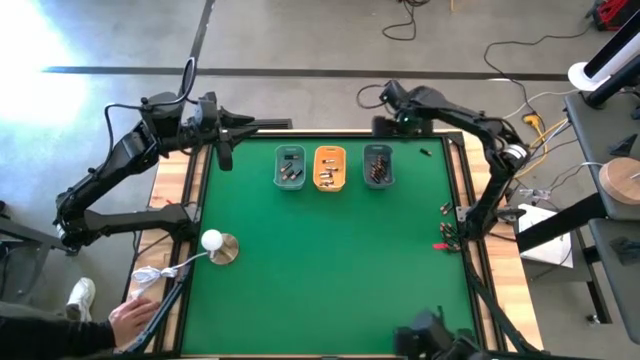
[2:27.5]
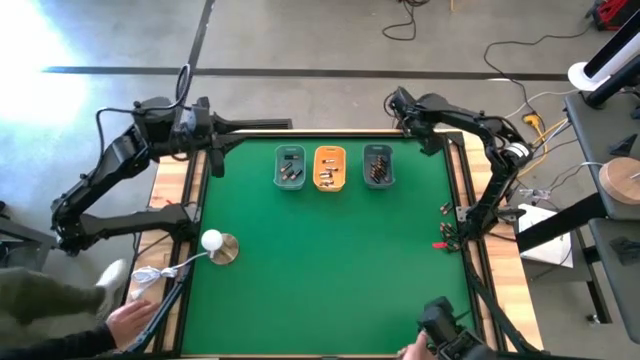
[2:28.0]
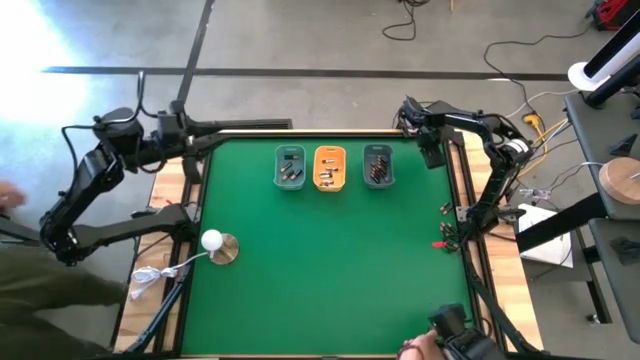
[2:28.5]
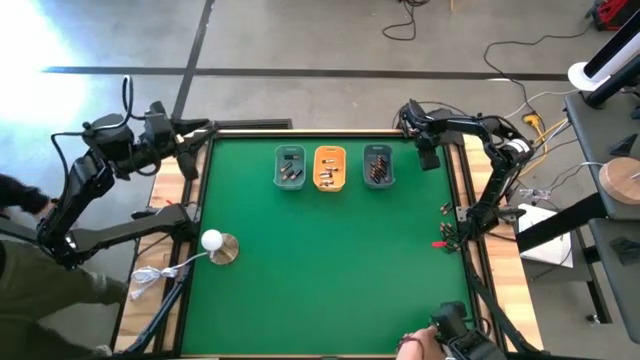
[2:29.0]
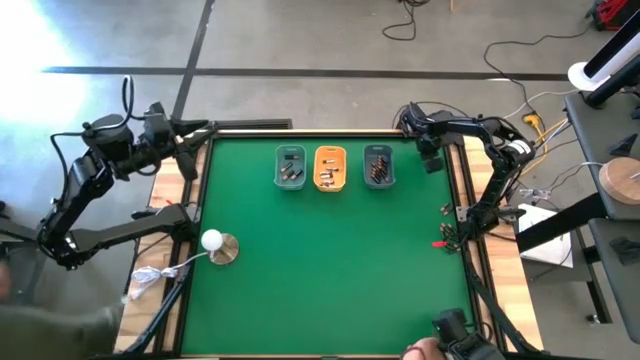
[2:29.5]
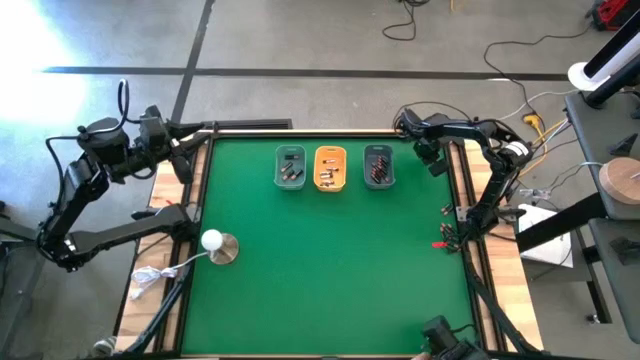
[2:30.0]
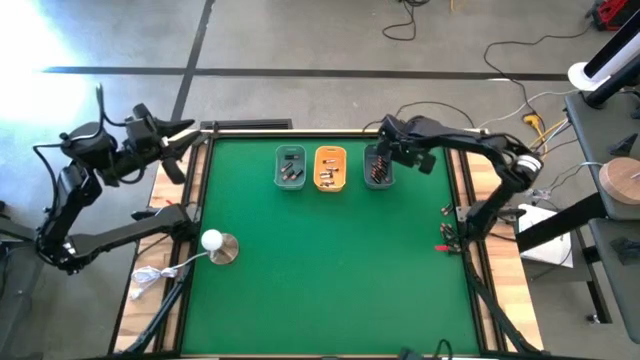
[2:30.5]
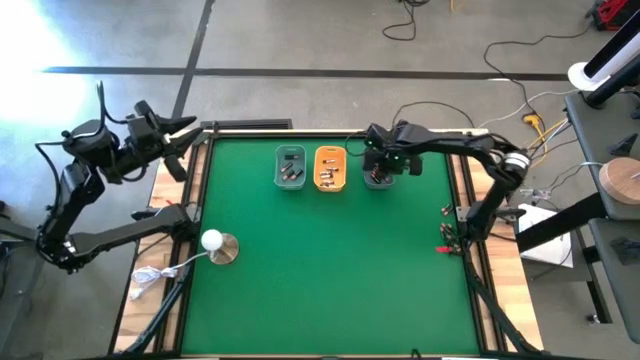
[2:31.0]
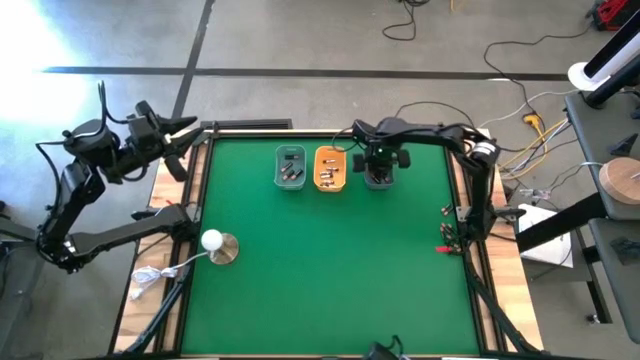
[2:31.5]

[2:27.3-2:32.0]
Task: Sort batteries
Put the small brown battery into the gray bin

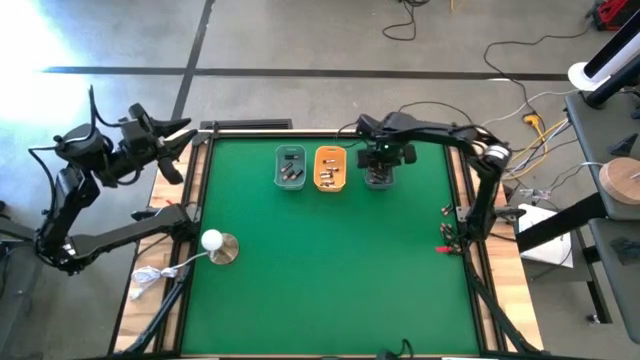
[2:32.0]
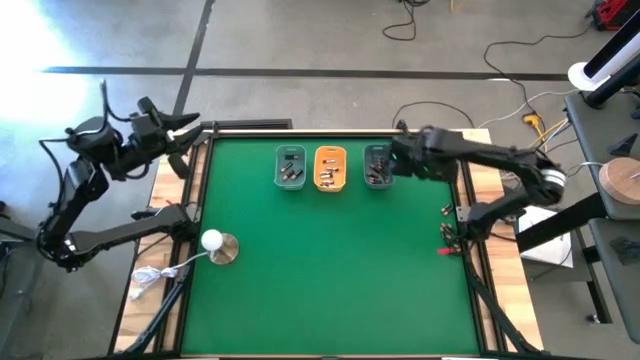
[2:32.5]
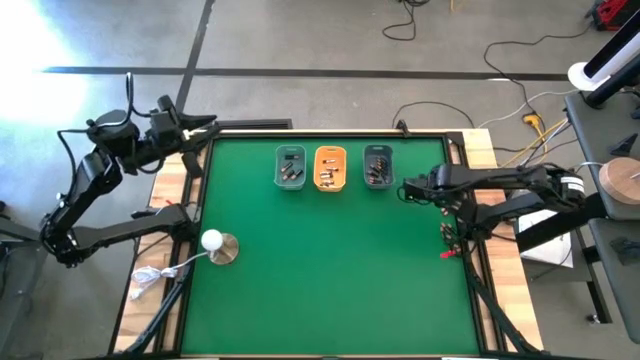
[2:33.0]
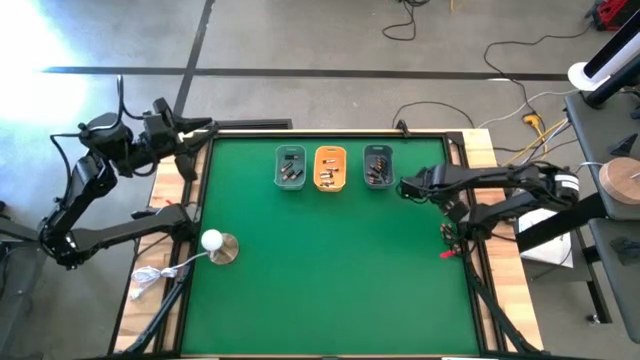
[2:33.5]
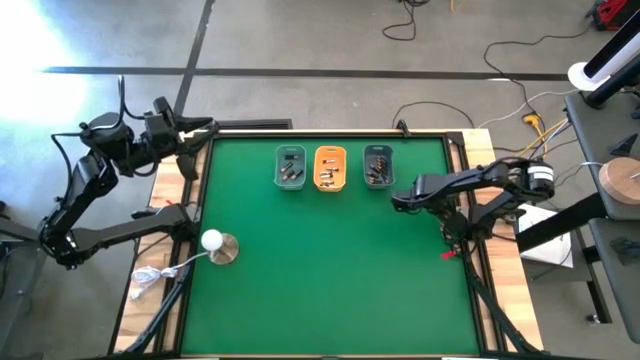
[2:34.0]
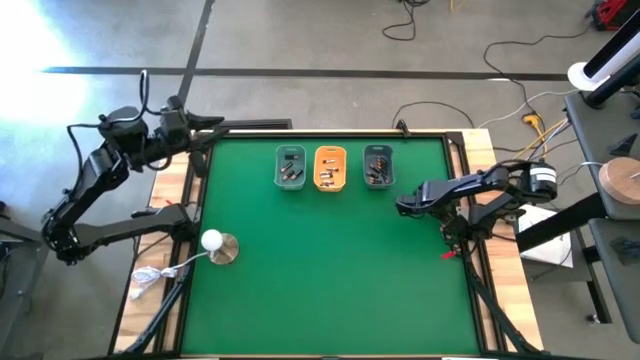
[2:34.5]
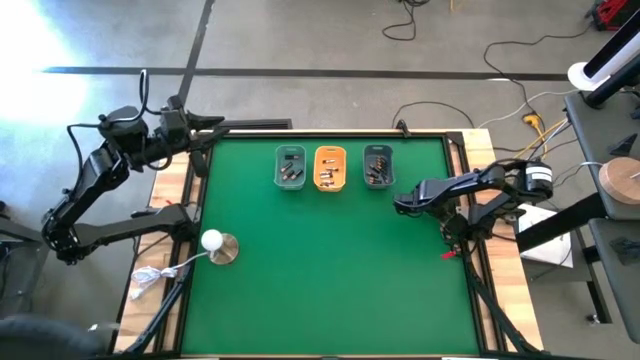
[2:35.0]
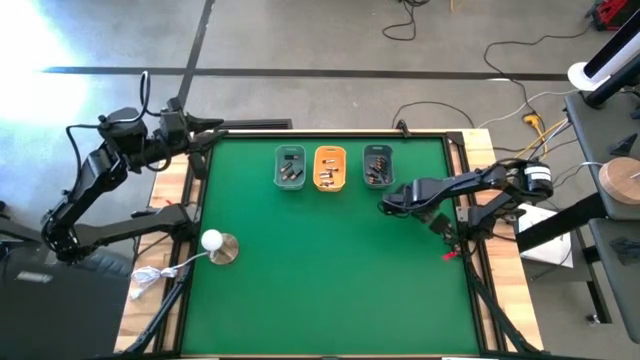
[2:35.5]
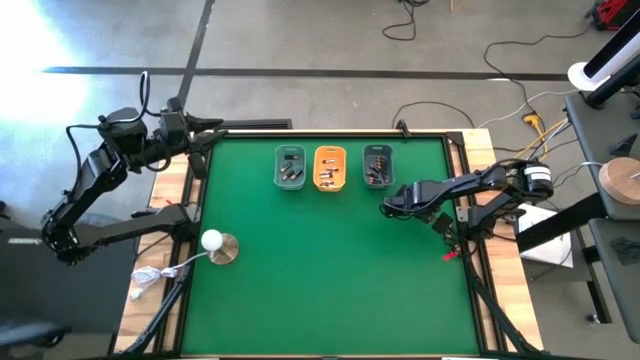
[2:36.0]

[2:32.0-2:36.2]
Put the small brown battery into the gray bin

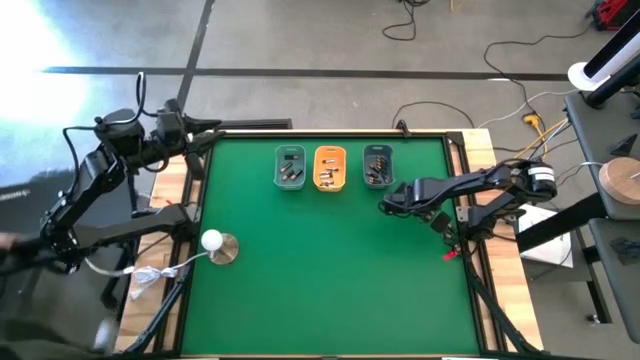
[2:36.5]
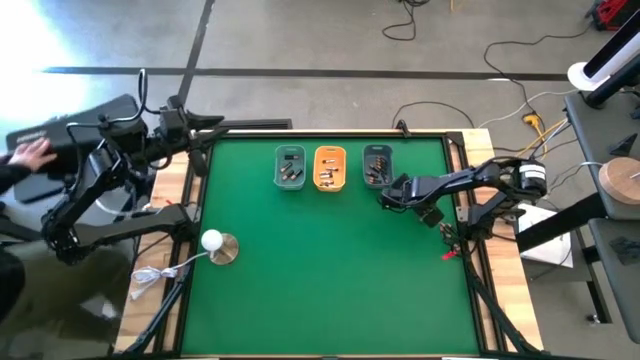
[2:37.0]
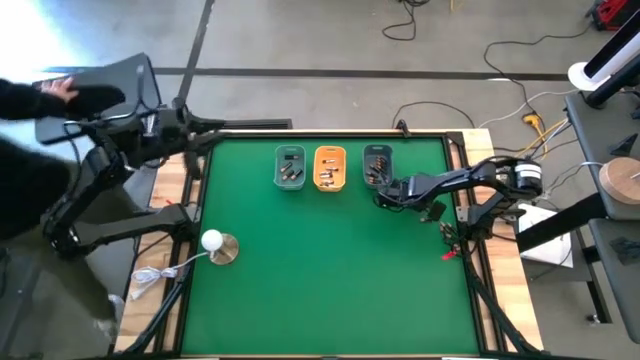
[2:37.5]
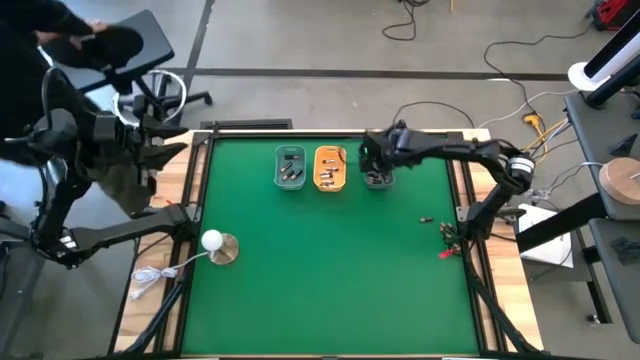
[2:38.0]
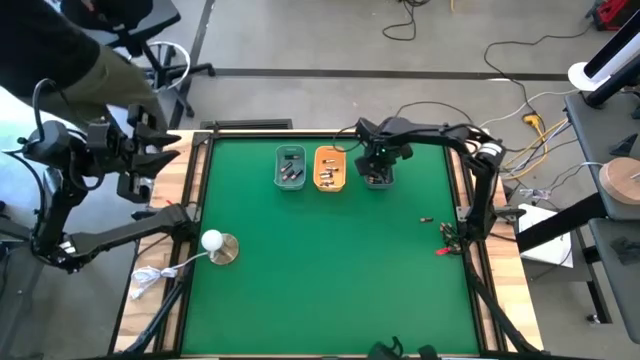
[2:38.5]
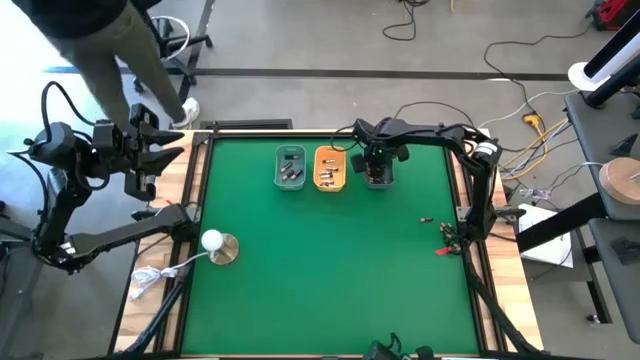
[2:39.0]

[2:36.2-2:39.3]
Put the small brown battery into the gray bin

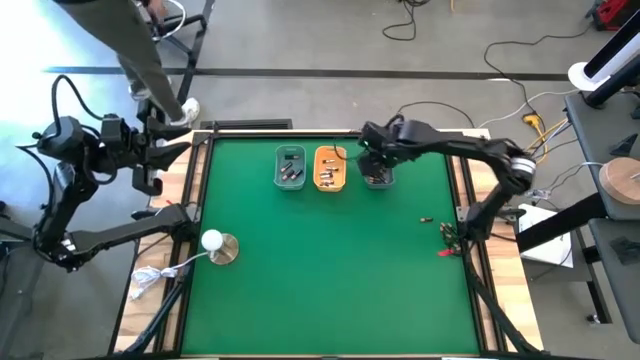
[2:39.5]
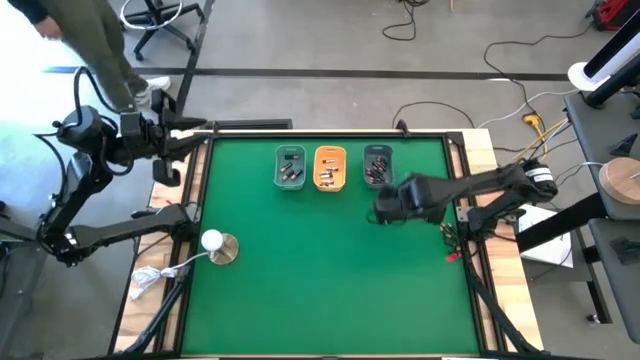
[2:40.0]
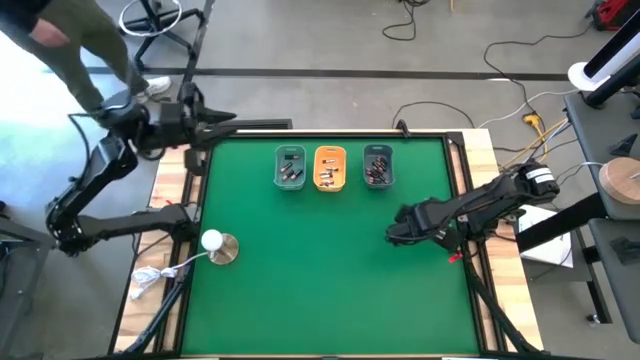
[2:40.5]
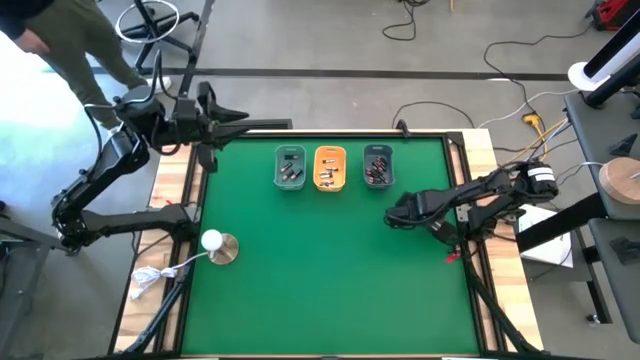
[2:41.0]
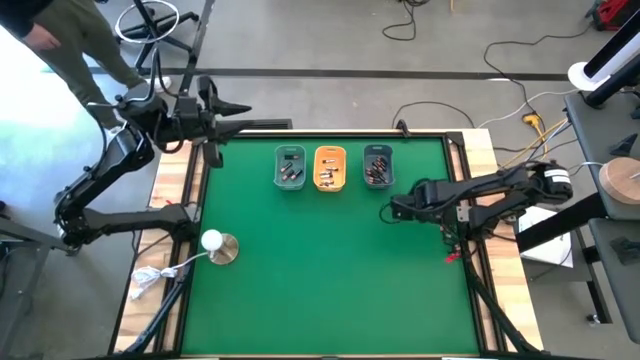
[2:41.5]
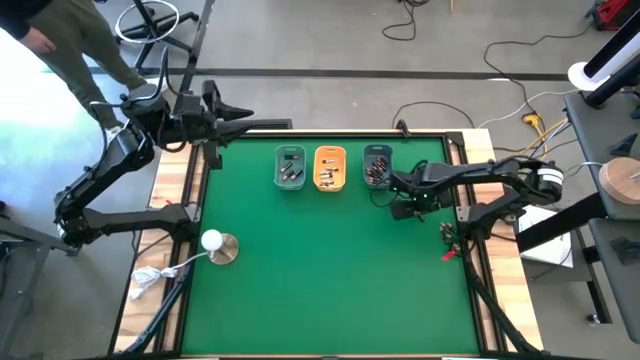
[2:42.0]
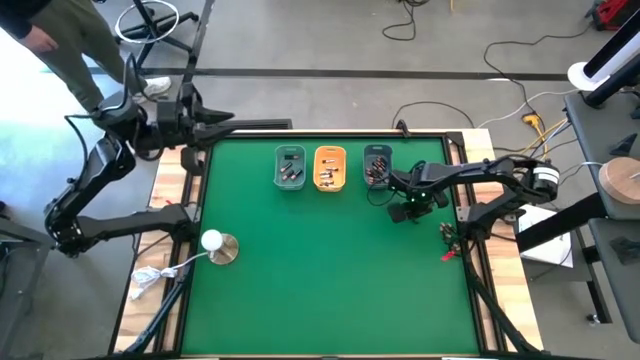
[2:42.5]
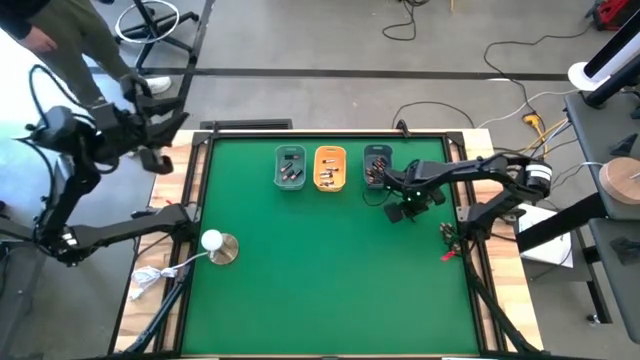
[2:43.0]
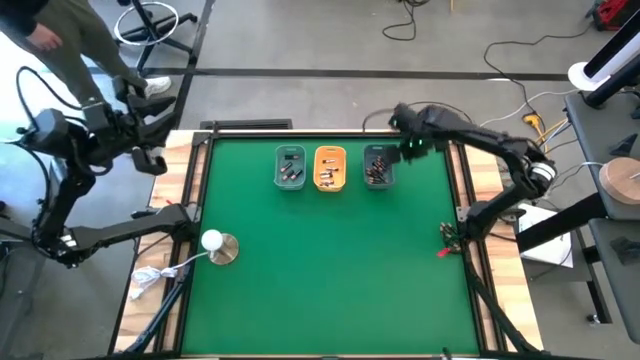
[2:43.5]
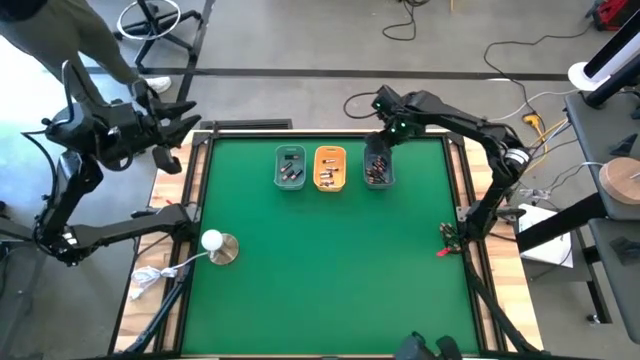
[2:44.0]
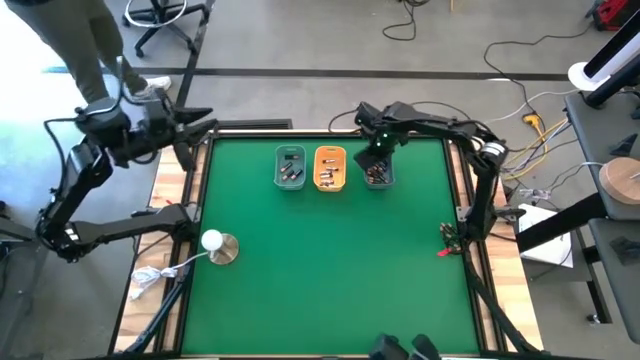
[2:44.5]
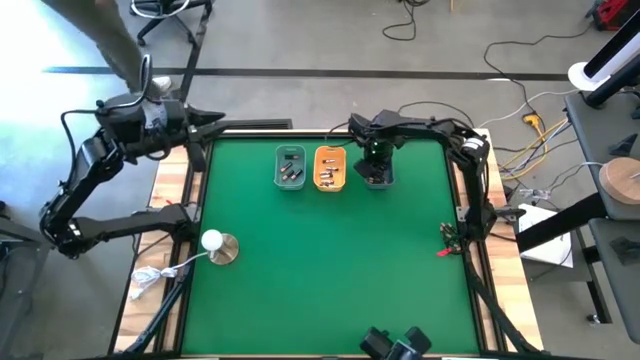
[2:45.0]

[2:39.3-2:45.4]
Put the small brown battery into the gray bin

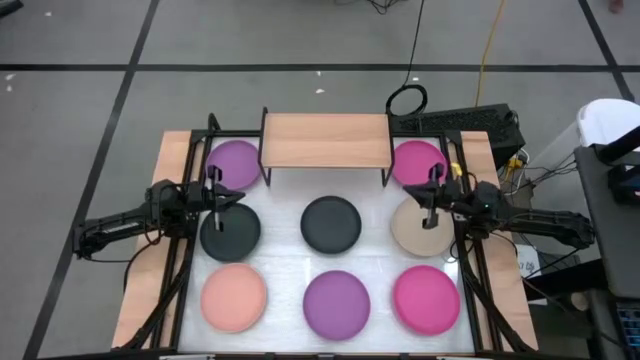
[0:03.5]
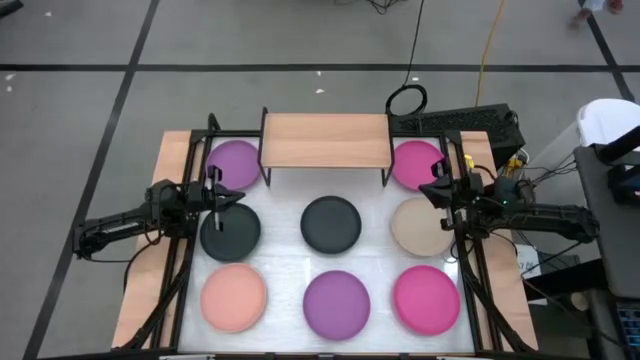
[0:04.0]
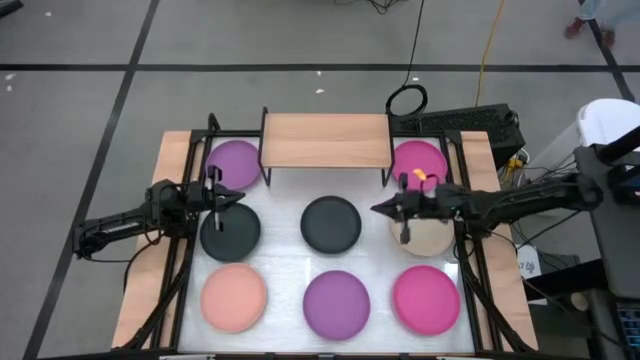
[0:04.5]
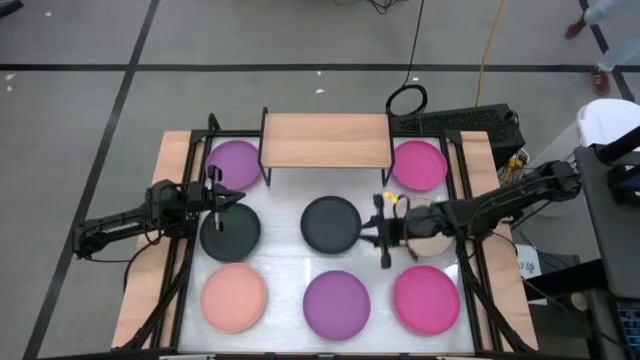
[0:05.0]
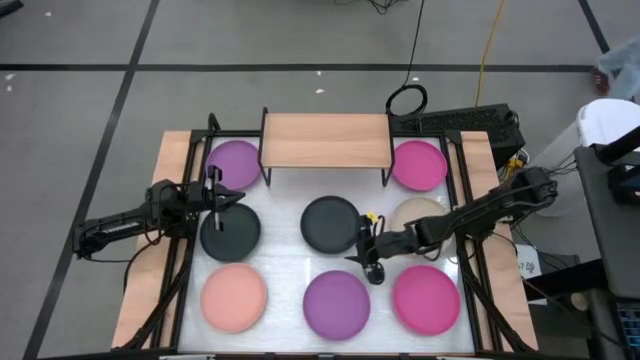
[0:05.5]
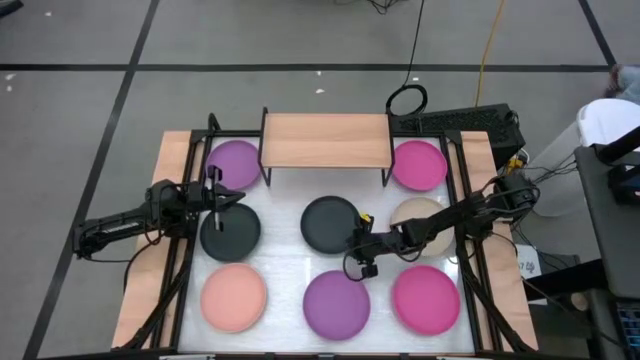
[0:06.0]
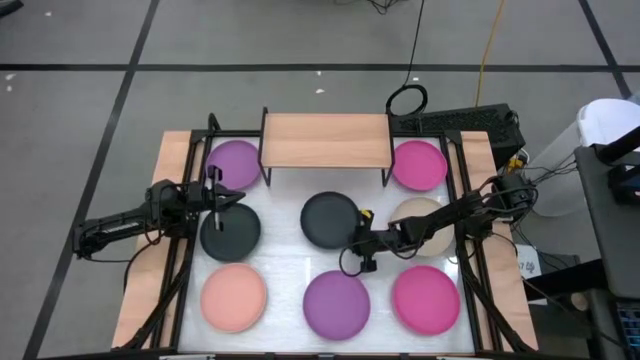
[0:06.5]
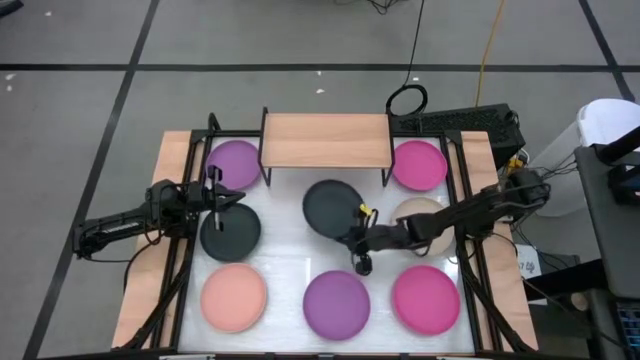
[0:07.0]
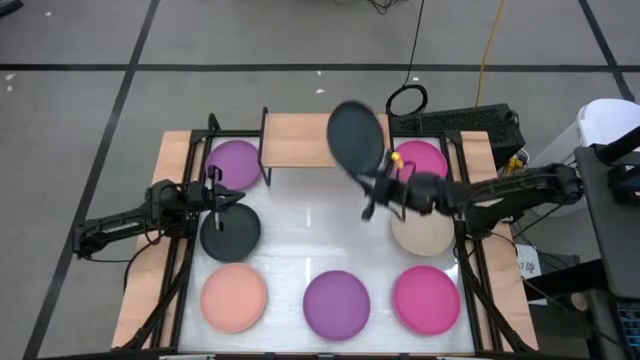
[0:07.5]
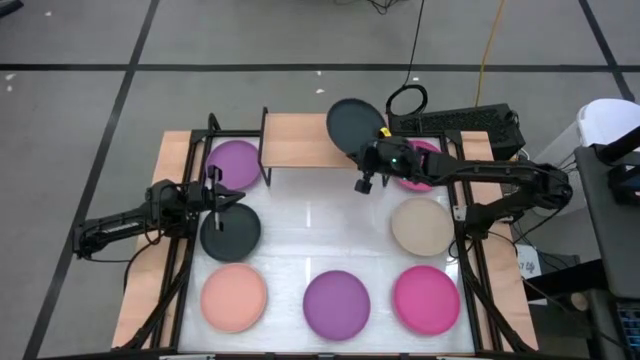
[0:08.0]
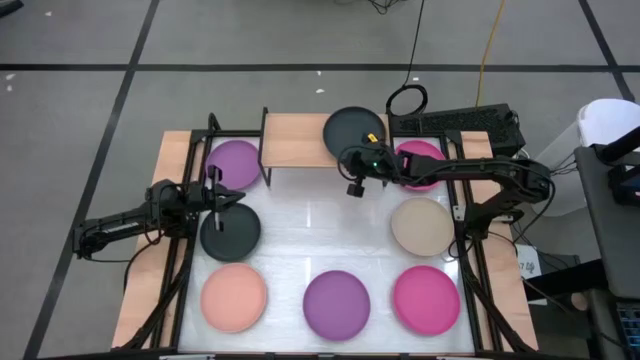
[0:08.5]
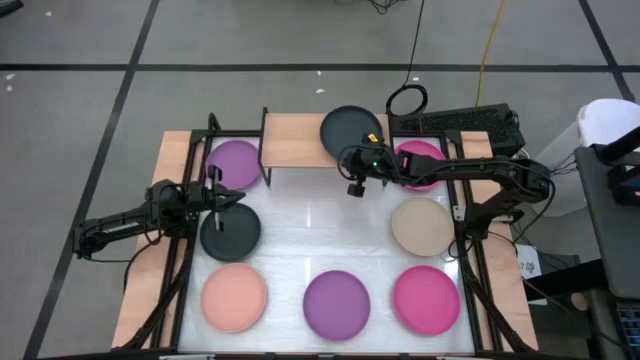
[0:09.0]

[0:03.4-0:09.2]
Task: Place and stack plates onto a shelf
Put the right black plate on the shelf
